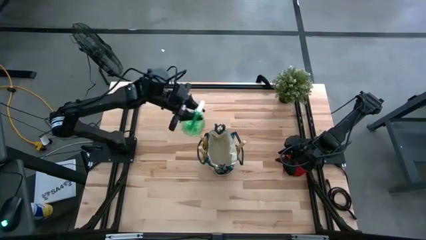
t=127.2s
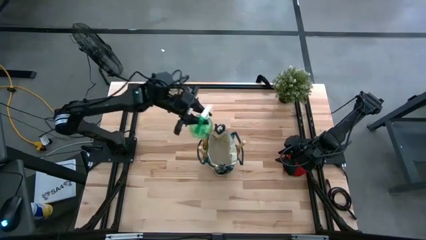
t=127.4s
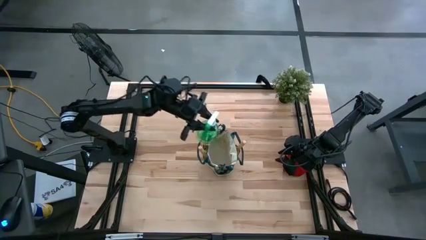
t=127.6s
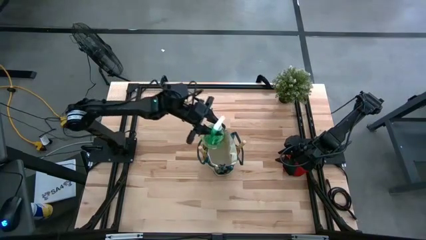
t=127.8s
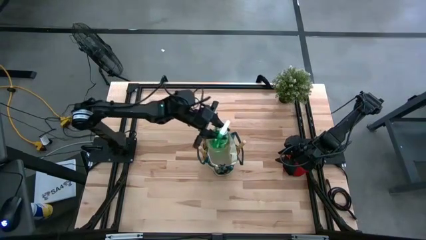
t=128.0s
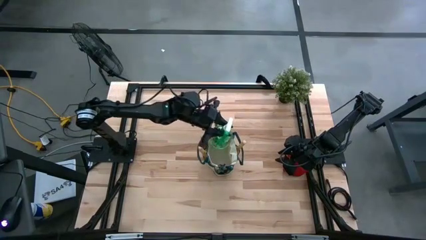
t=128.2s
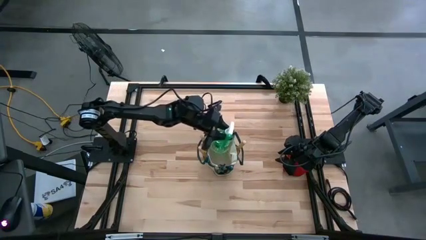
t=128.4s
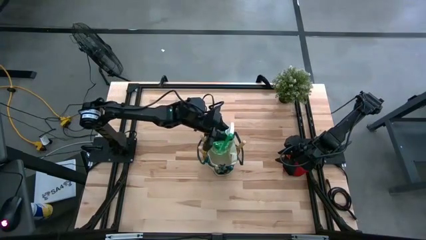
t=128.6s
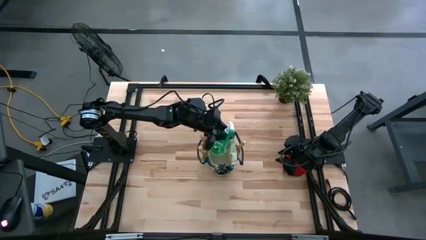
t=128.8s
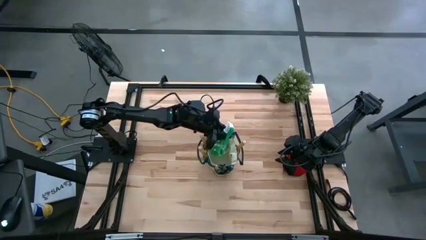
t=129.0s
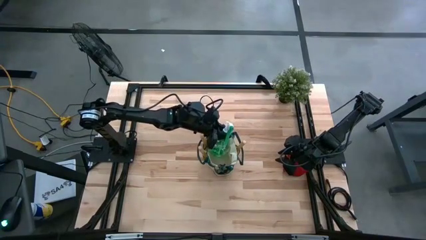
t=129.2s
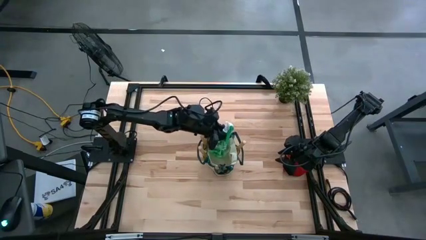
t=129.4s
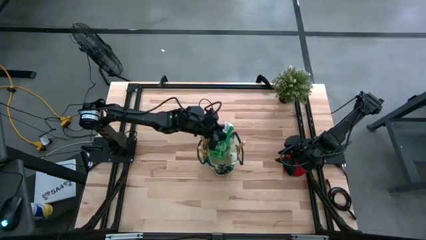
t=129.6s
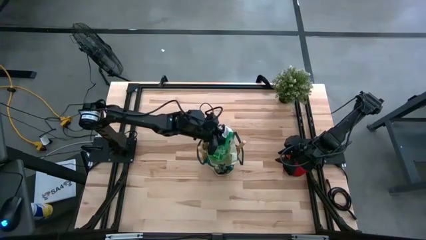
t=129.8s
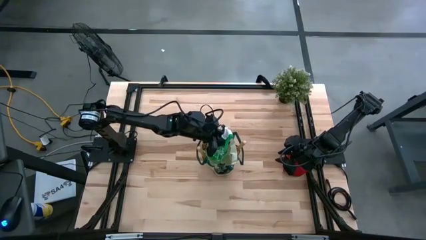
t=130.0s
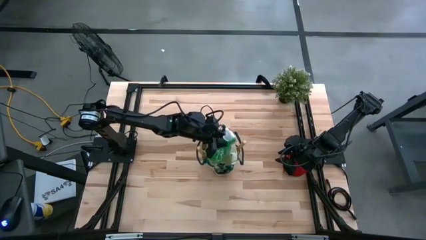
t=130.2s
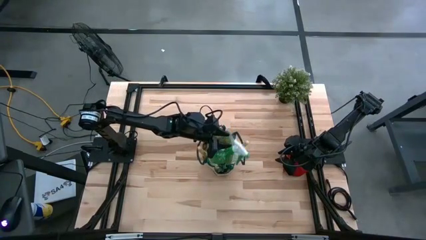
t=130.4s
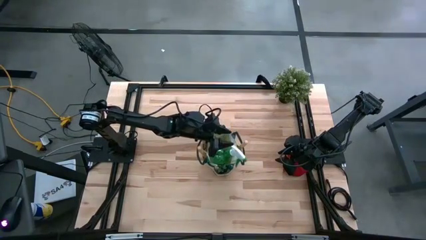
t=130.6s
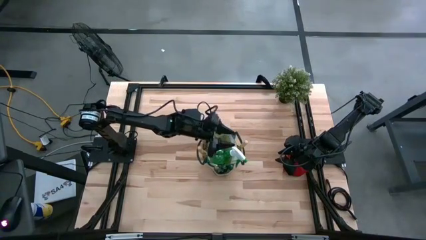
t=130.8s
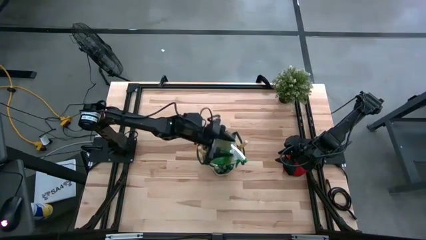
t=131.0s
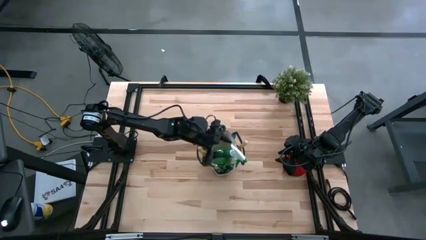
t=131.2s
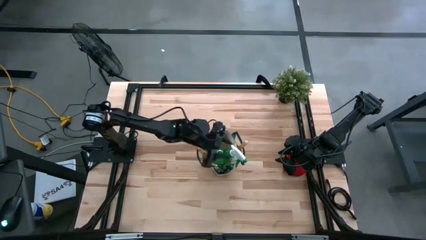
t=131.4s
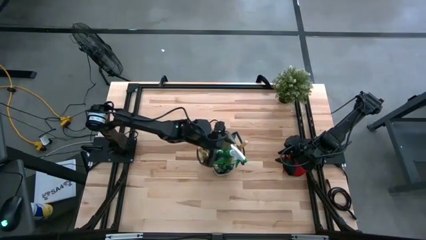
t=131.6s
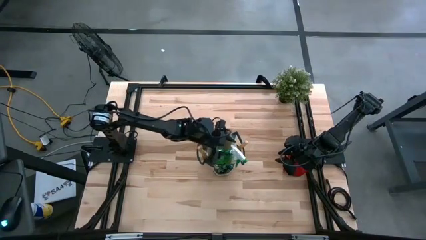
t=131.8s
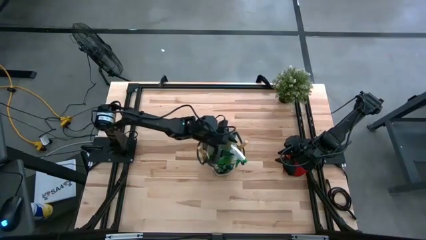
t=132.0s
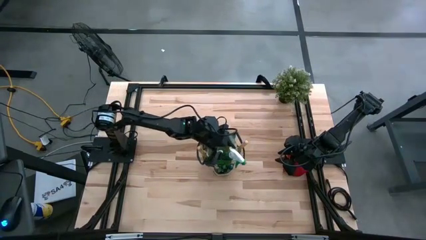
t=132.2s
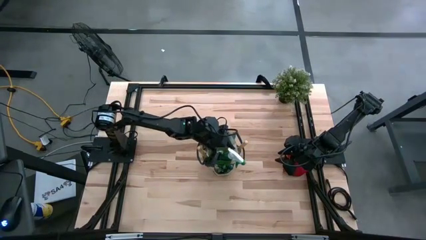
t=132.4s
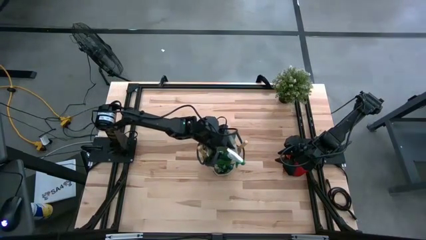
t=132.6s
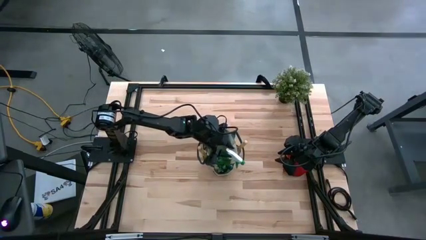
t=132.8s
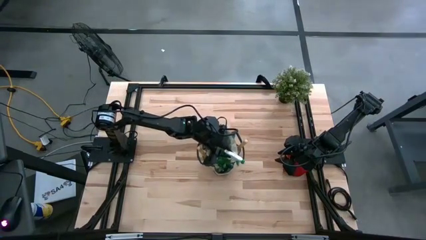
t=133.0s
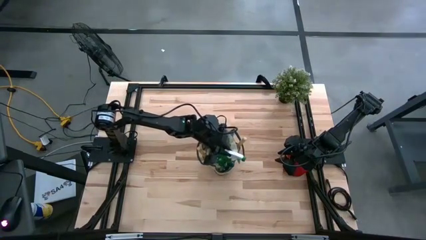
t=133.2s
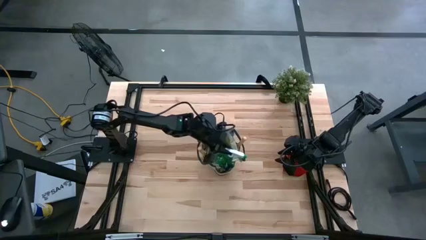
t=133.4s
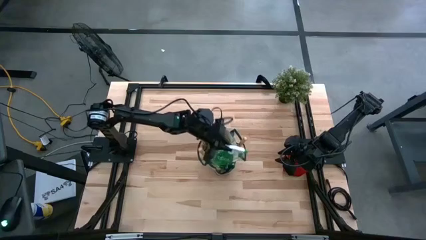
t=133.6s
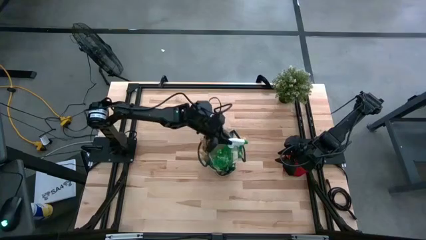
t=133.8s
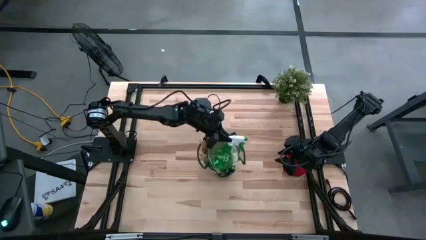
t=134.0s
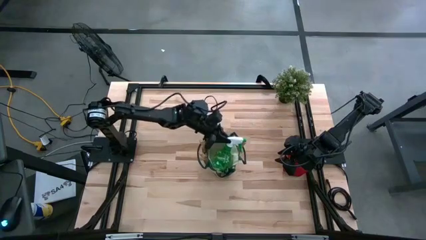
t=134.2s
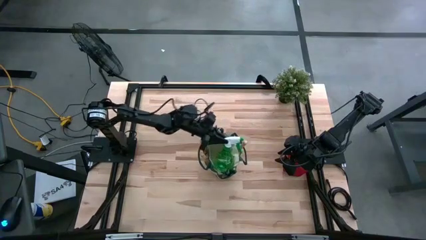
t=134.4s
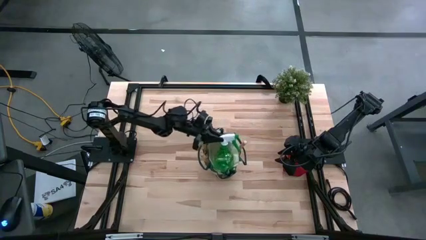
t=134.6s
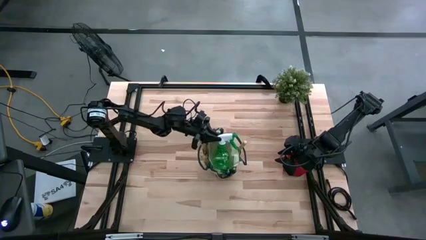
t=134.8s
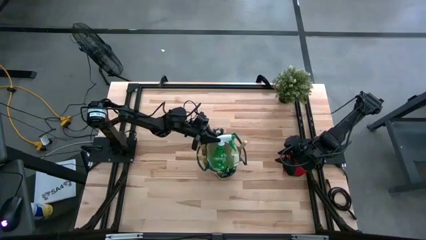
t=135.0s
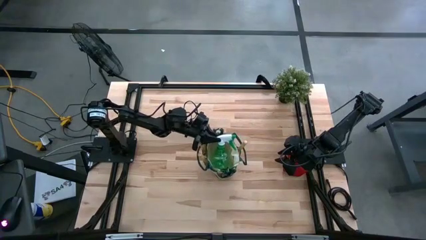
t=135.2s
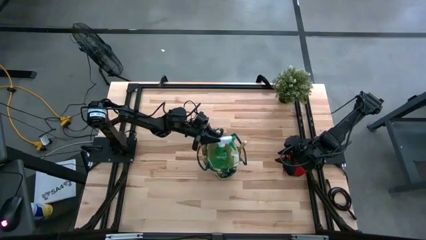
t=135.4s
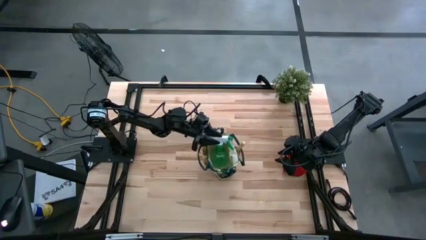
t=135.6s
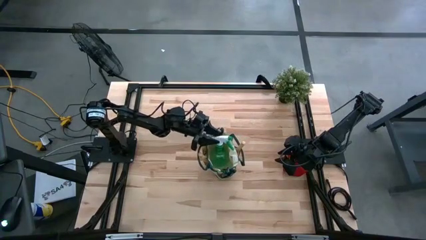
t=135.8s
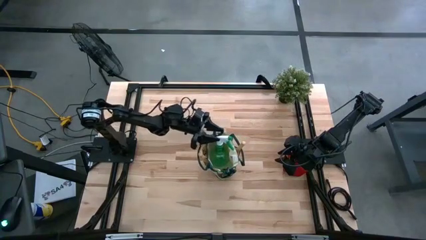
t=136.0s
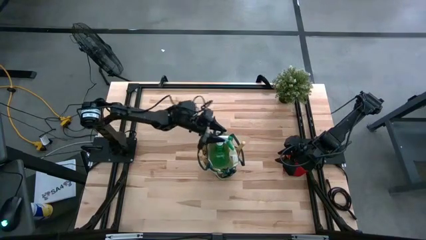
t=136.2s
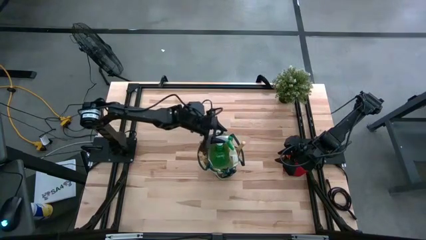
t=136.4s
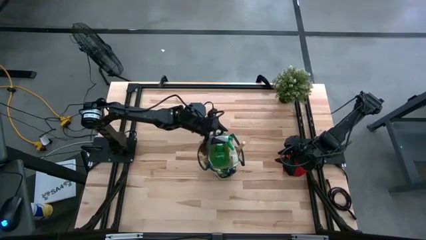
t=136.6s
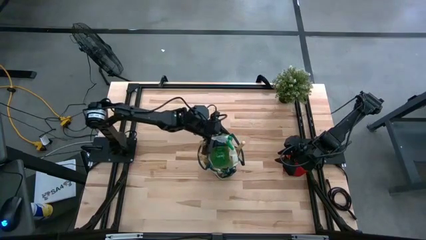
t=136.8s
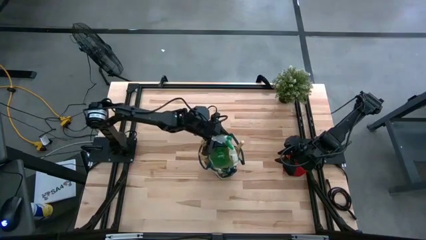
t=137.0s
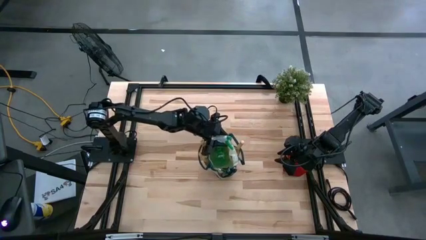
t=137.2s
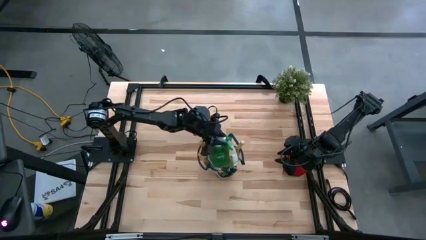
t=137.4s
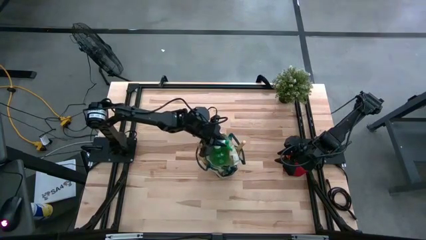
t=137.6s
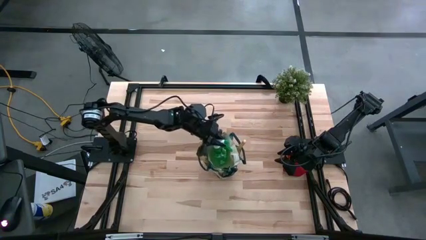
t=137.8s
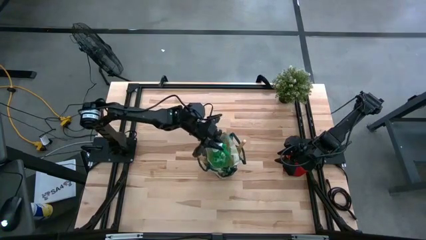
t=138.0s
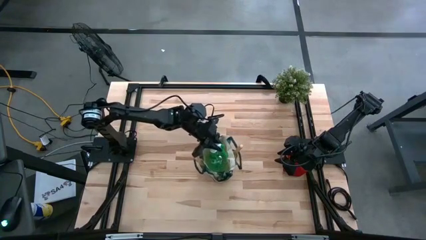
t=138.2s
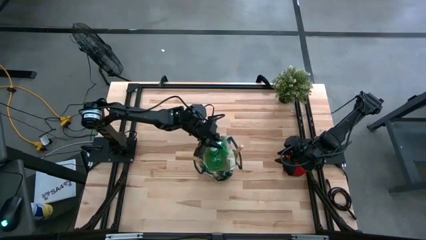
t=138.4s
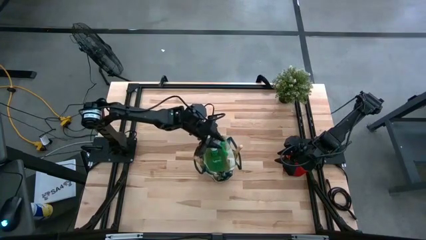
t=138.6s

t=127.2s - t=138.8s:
Task: Pick & Place Garden tools in Gardening bag
Put the green spray bottle into the white gardening bag
